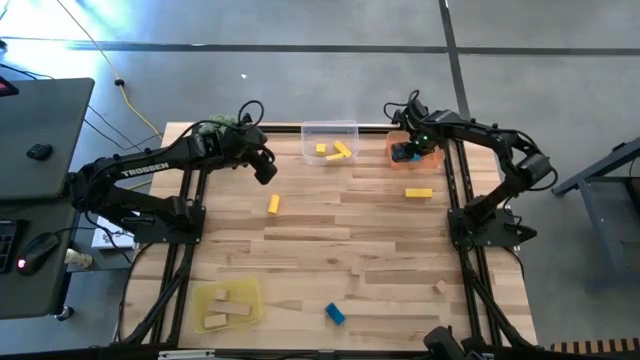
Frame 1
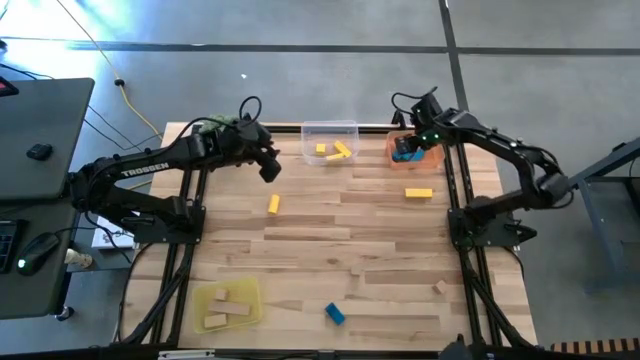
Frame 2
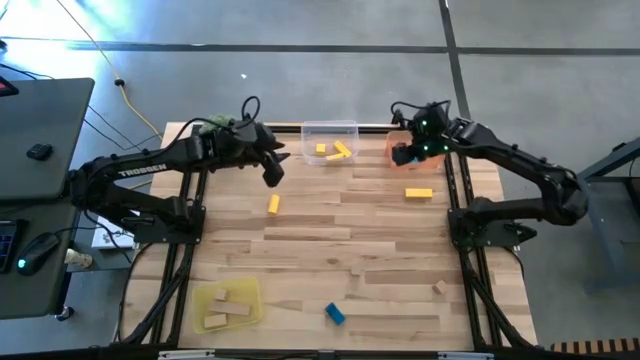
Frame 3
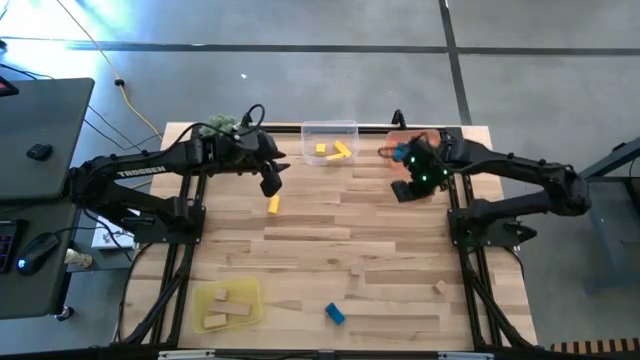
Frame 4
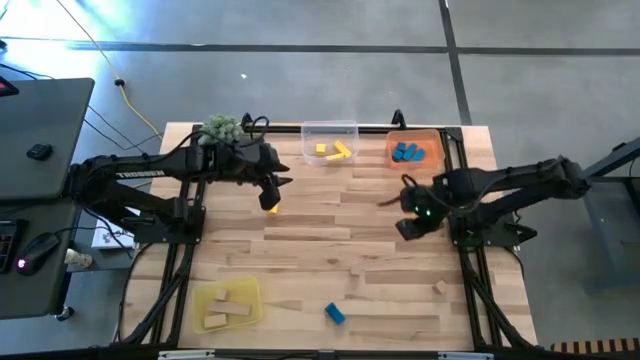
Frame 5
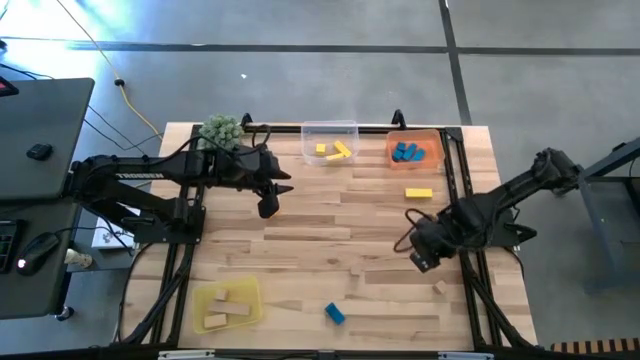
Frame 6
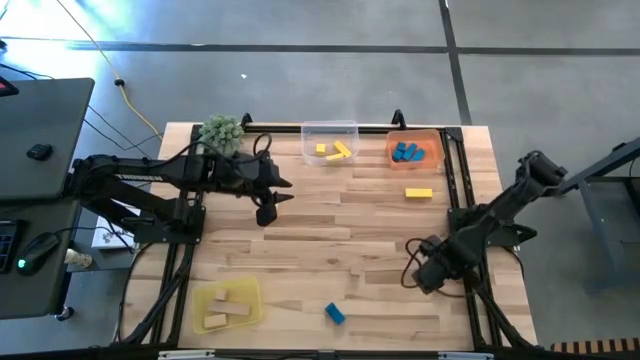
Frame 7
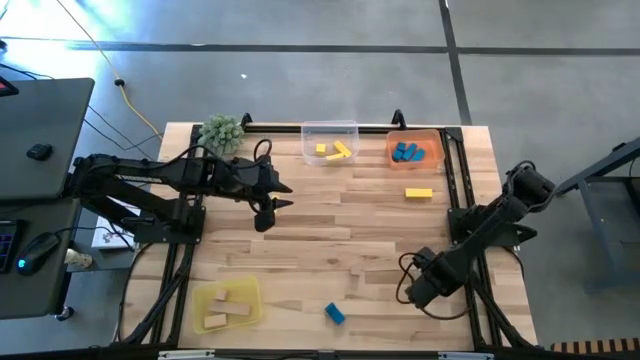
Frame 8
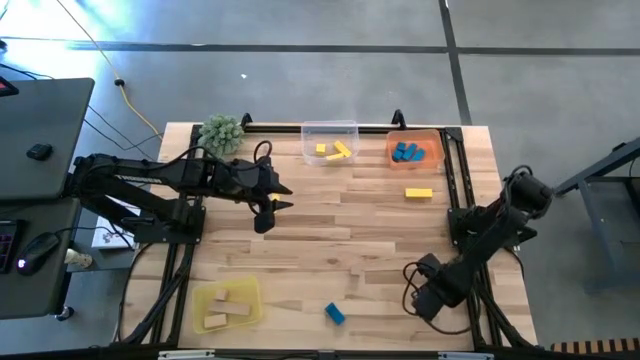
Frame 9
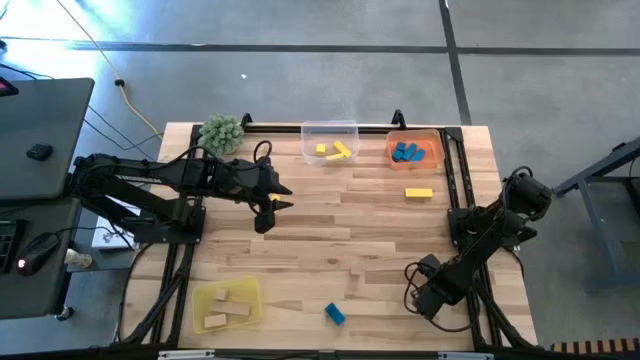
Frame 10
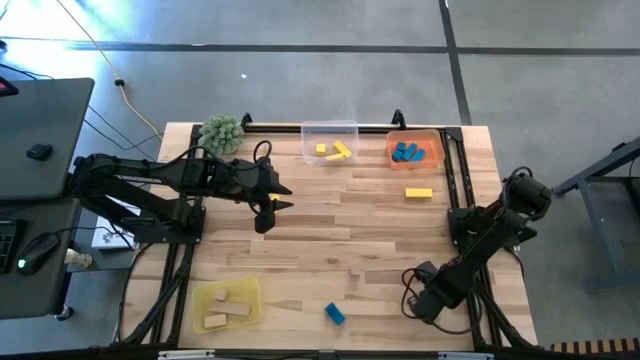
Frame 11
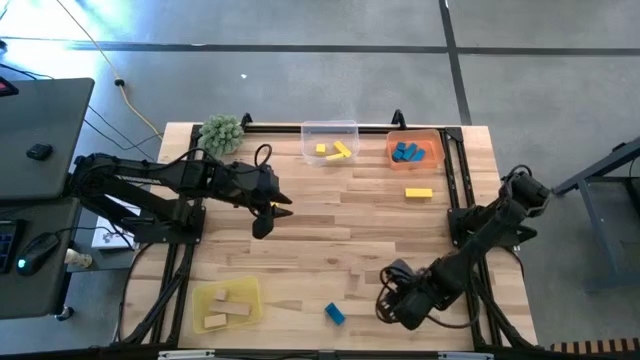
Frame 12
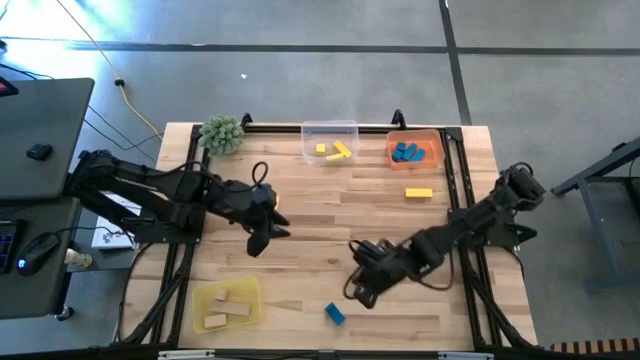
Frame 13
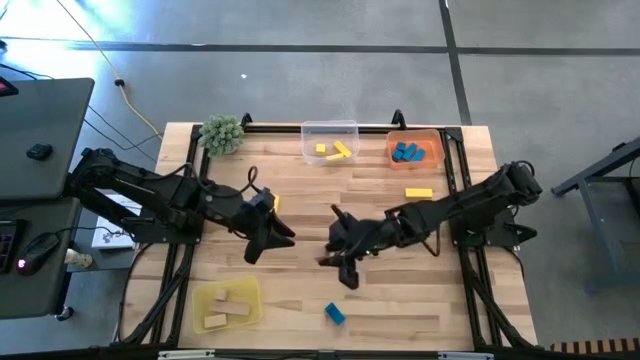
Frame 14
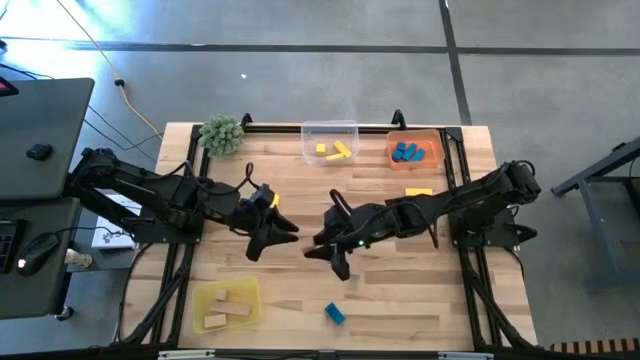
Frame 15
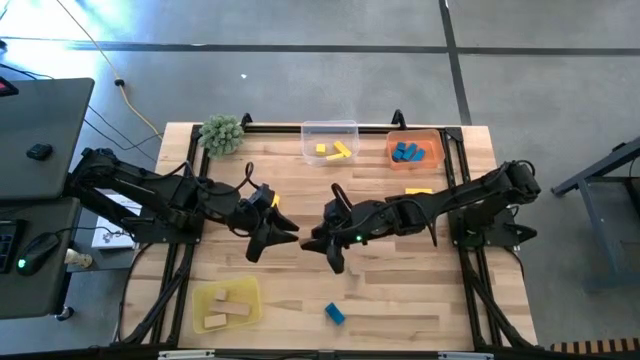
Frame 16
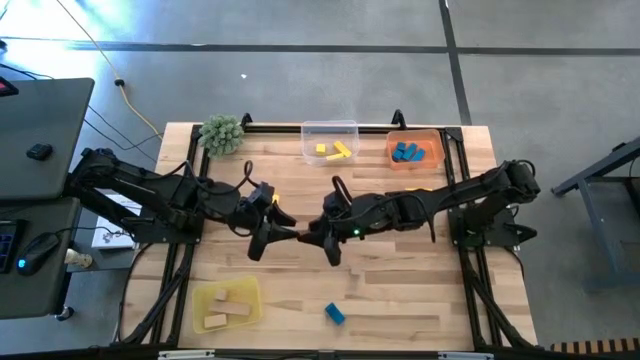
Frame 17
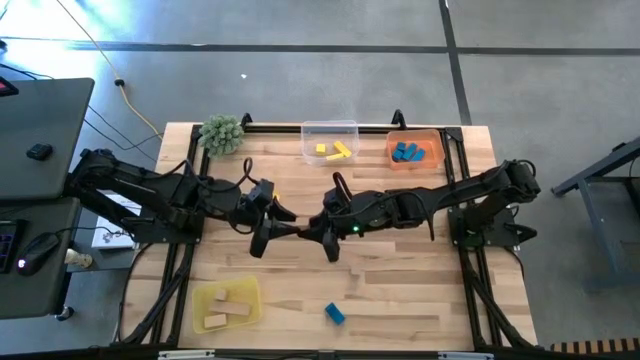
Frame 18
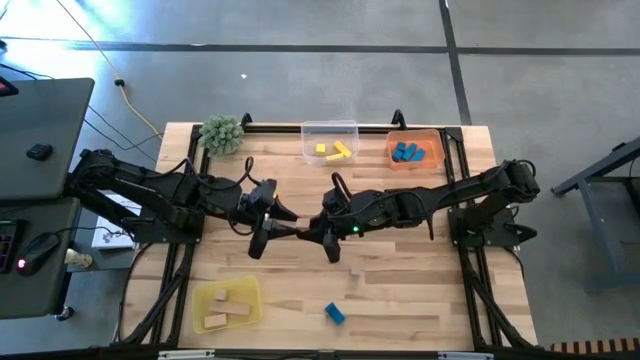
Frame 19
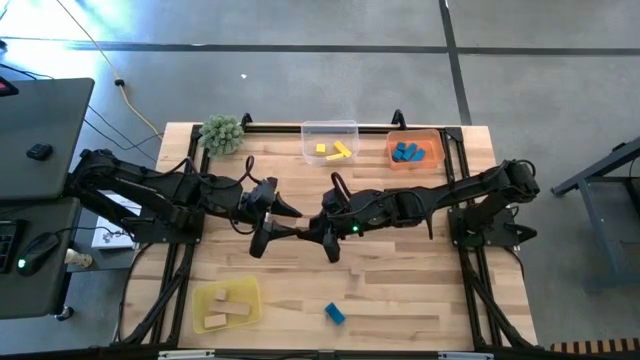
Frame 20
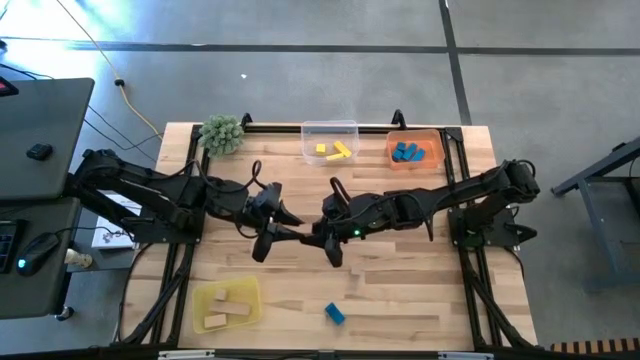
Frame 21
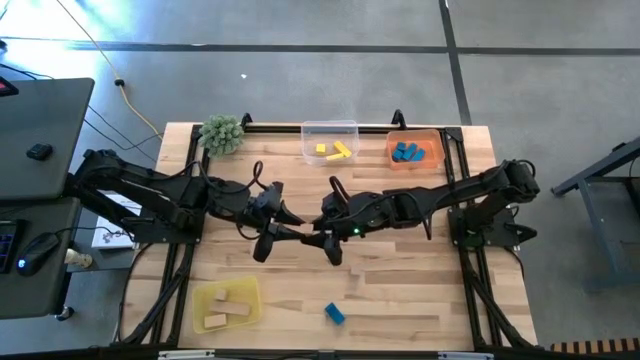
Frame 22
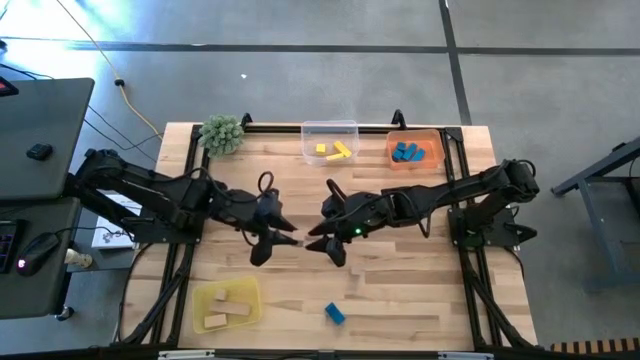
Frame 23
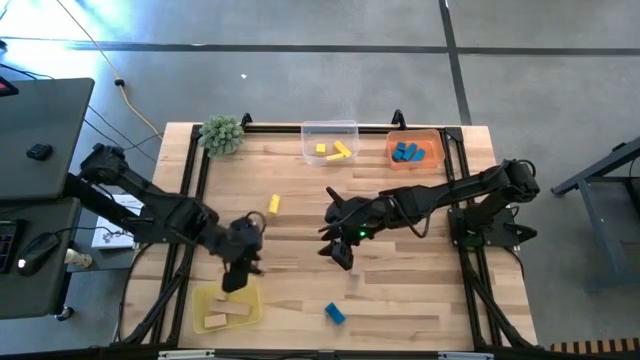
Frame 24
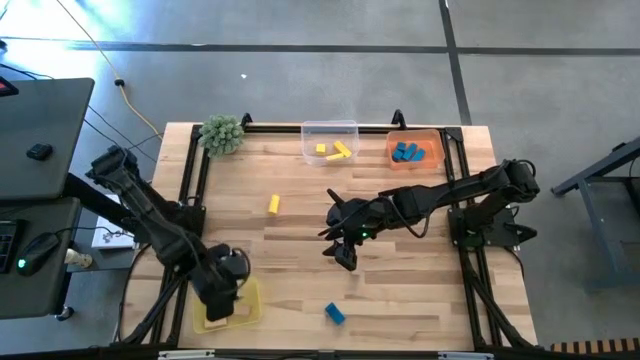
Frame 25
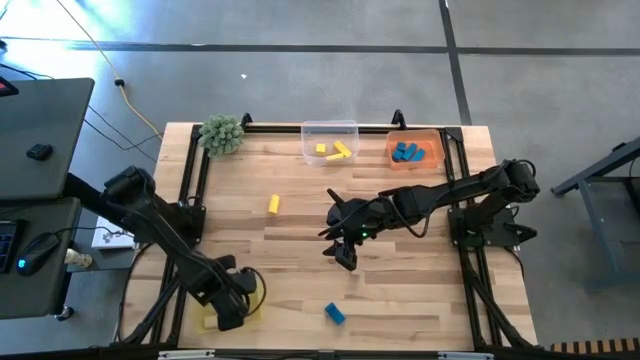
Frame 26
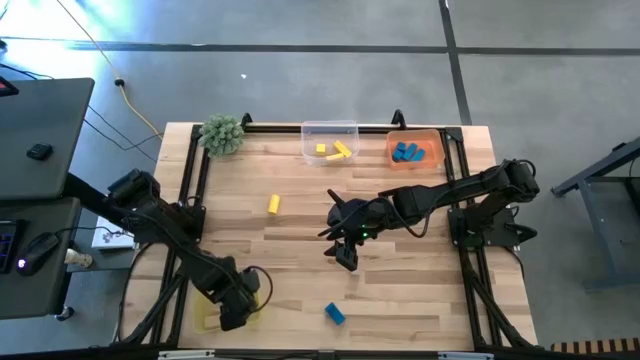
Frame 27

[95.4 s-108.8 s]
Task: Sort & place blocks by color
Put the brown block into the yellow bin

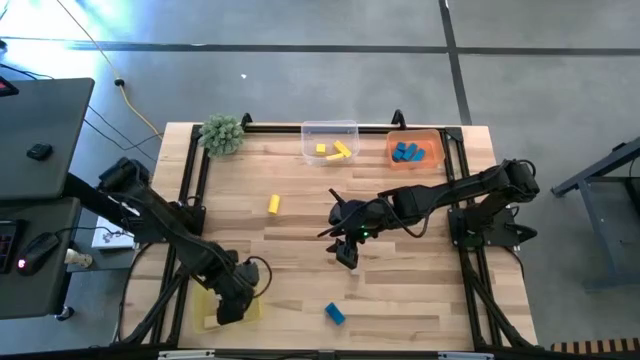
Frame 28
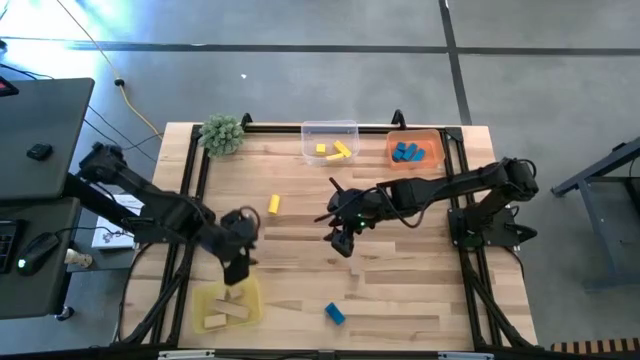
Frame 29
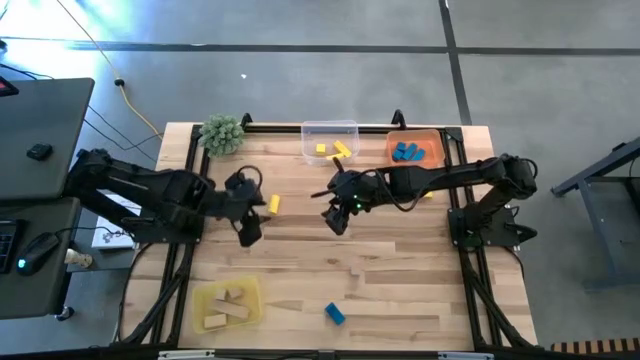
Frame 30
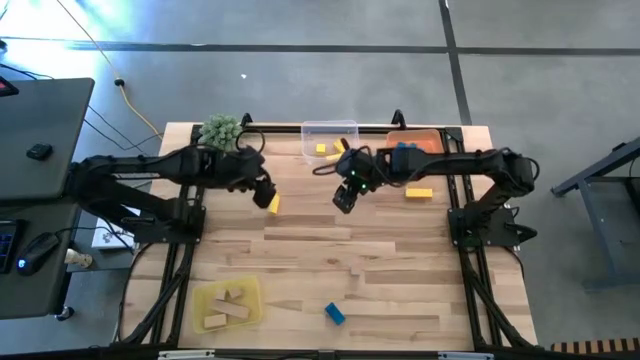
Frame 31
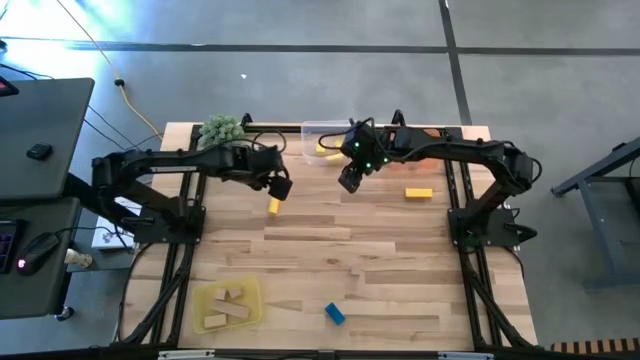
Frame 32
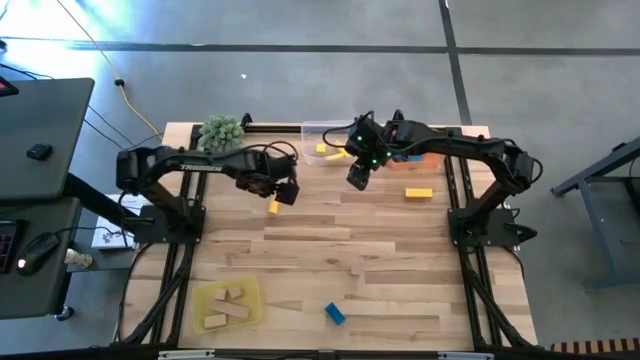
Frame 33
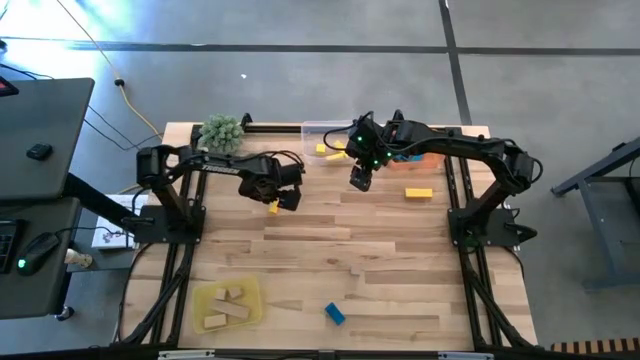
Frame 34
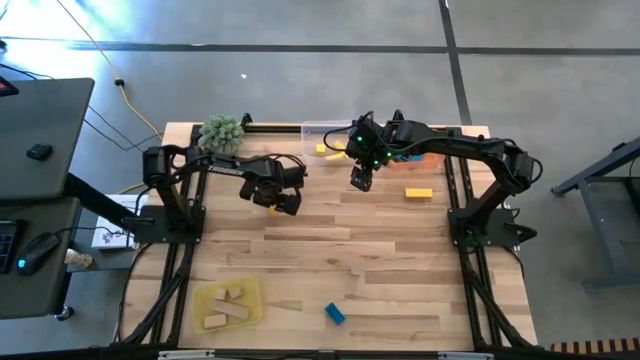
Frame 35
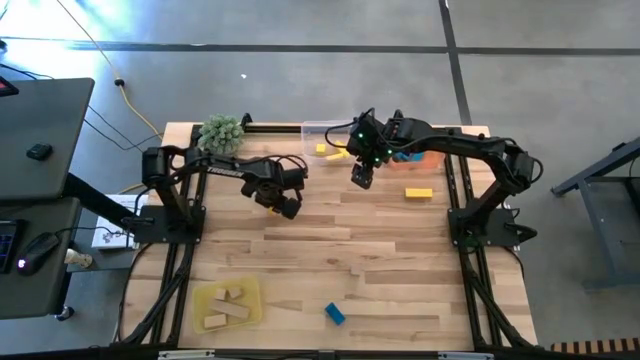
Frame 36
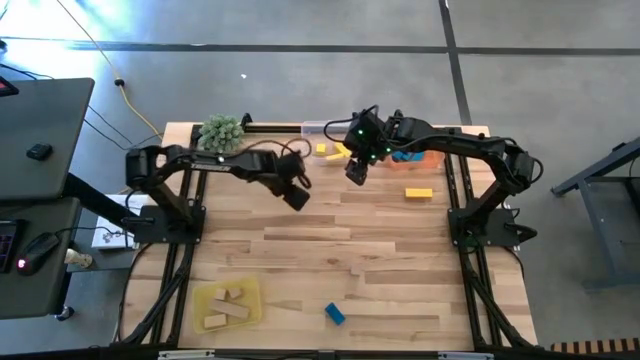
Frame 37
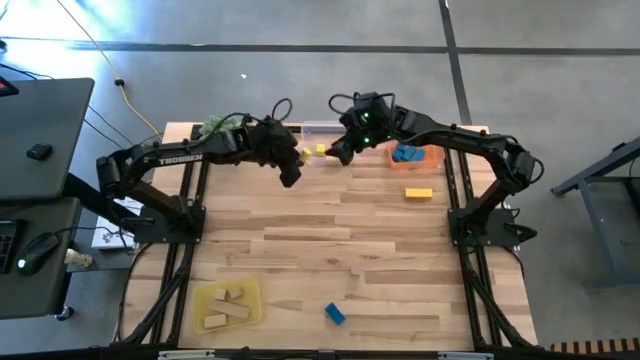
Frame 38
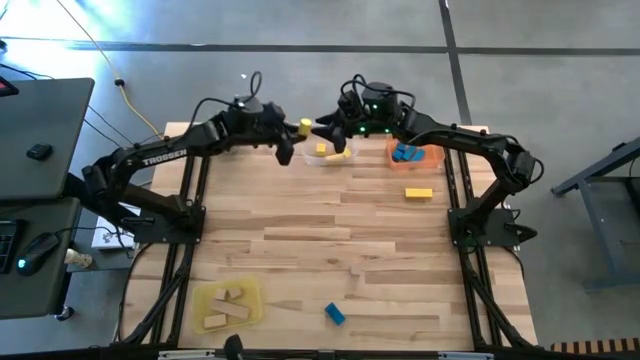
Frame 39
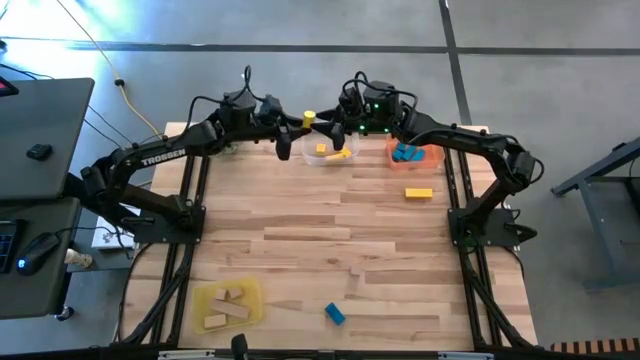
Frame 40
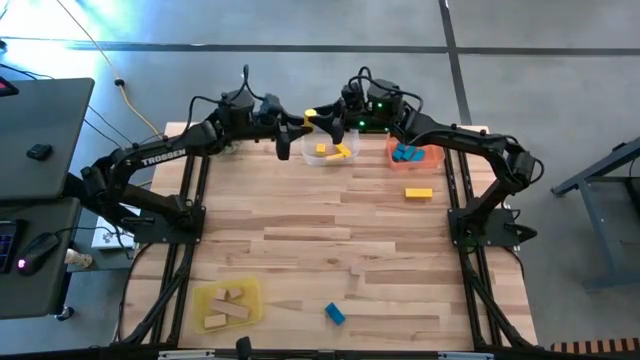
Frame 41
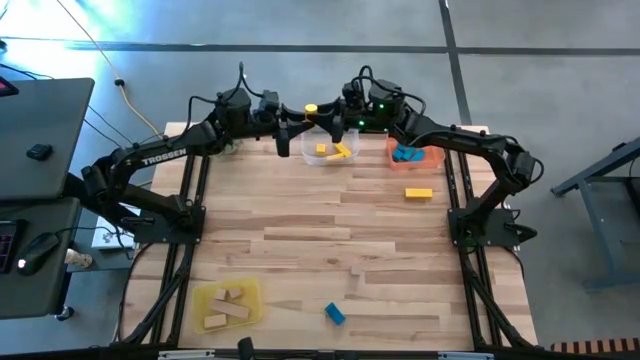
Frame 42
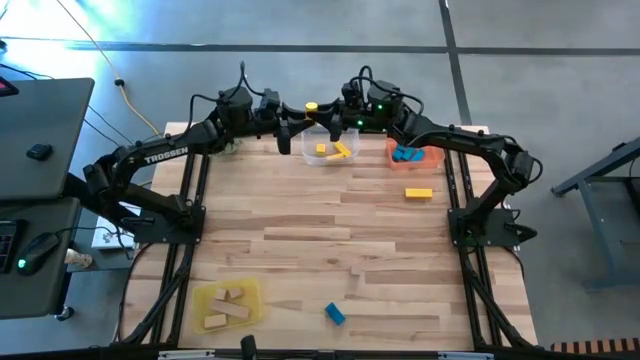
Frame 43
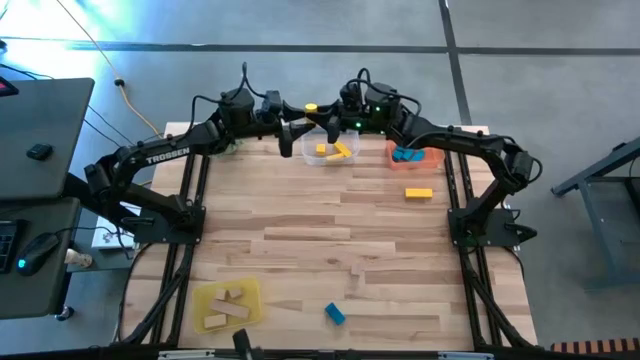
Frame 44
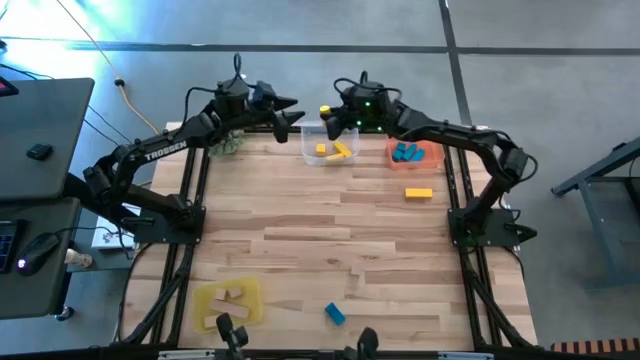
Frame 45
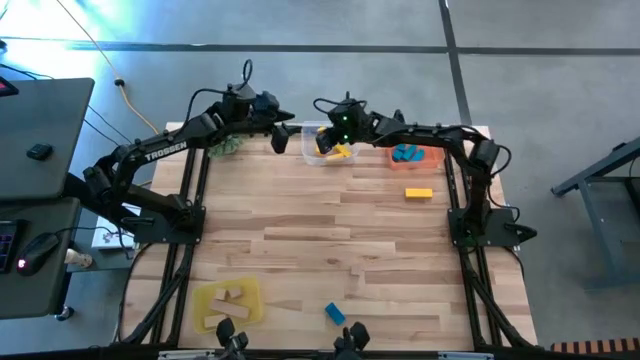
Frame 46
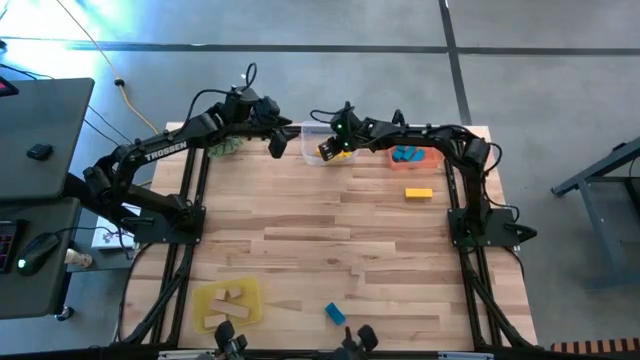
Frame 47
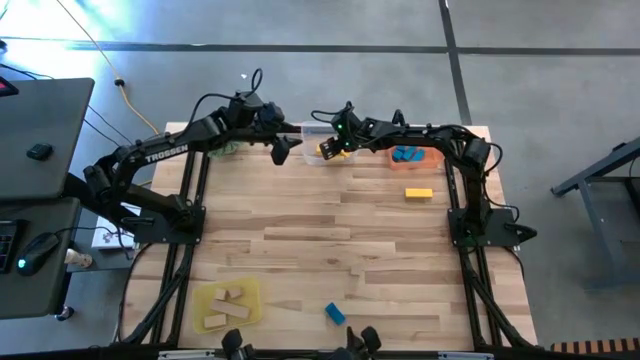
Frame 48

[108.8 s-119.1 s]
Put the yellow block into the transparent bin
